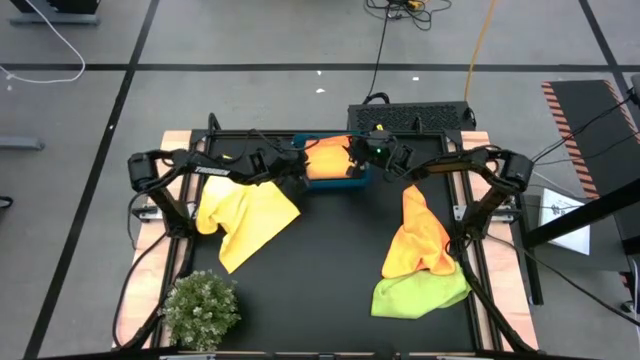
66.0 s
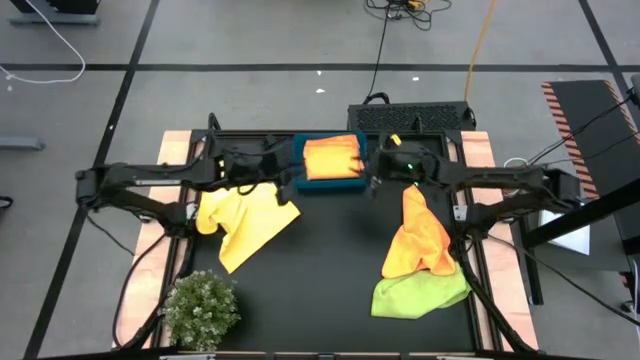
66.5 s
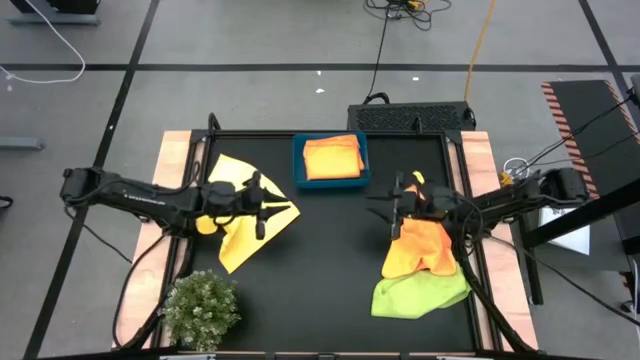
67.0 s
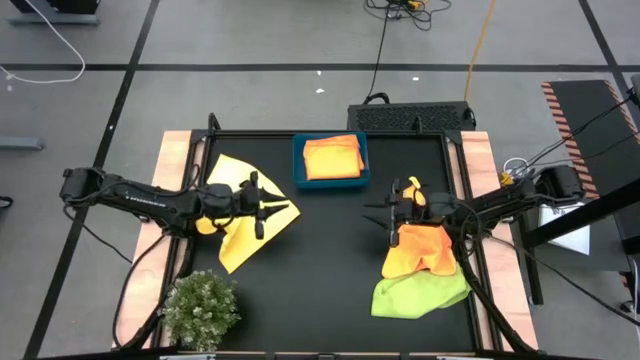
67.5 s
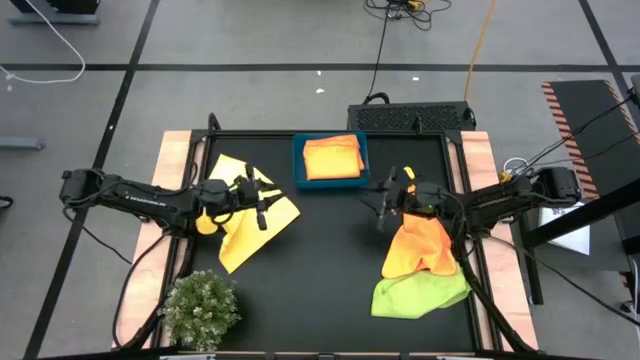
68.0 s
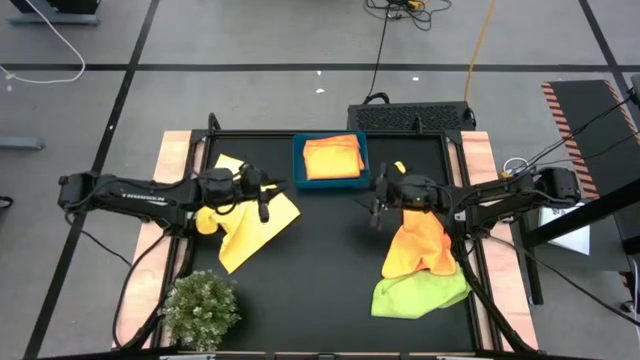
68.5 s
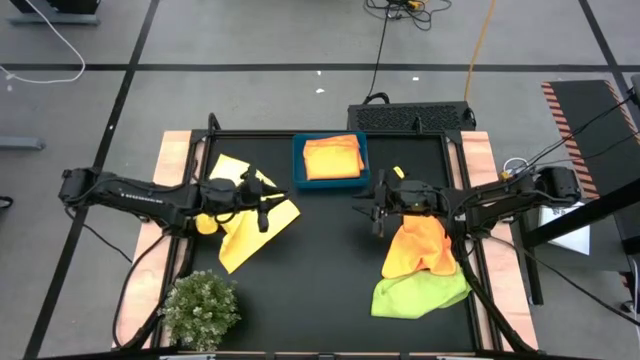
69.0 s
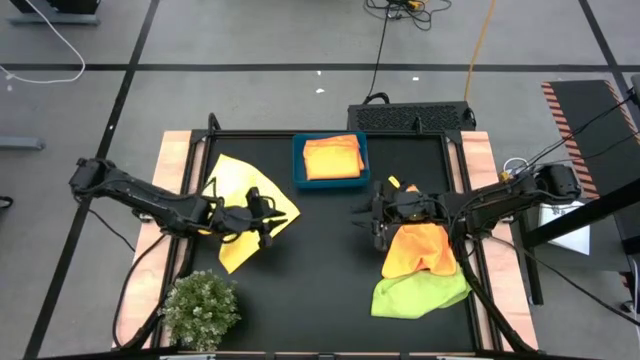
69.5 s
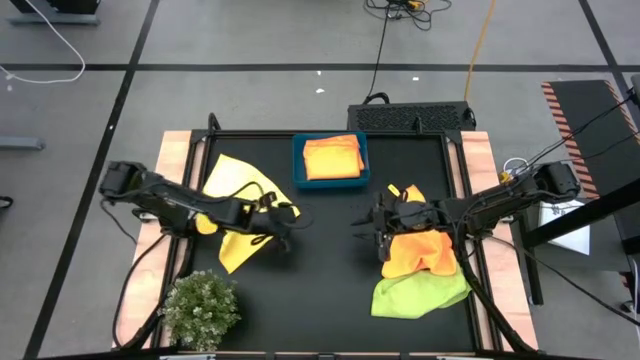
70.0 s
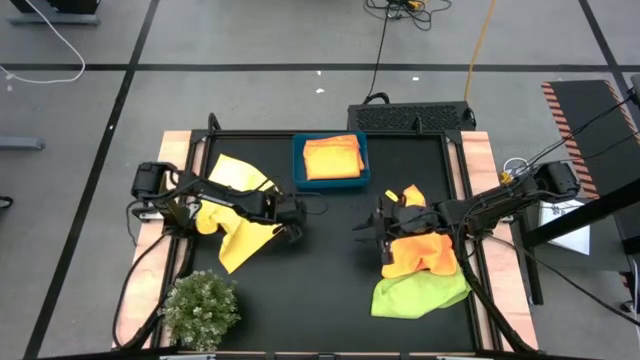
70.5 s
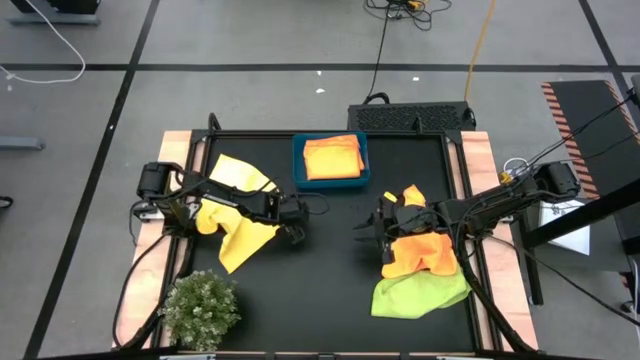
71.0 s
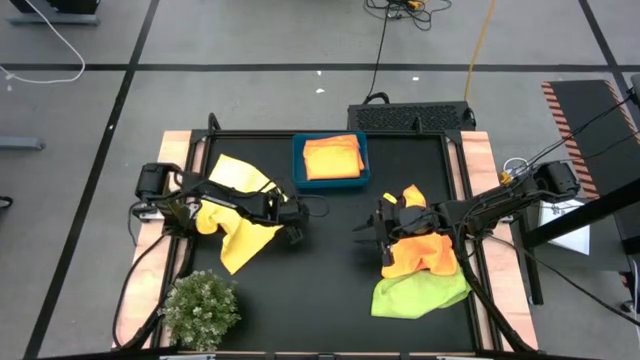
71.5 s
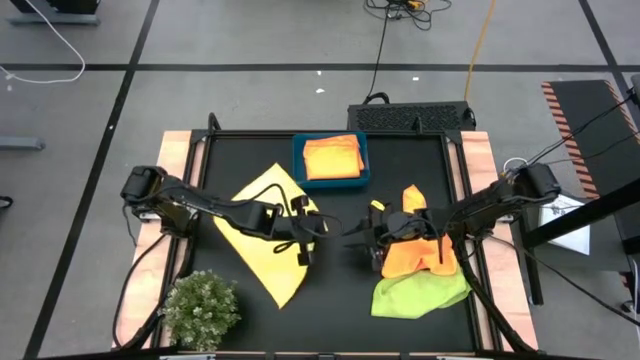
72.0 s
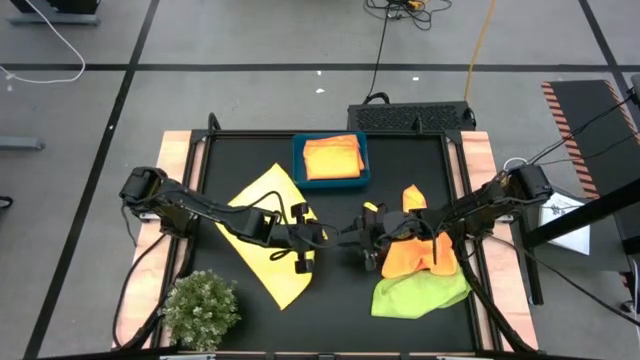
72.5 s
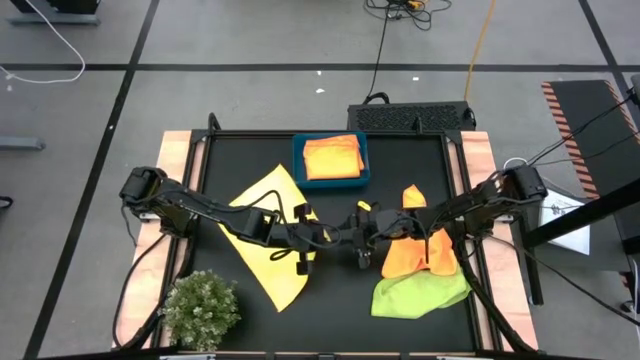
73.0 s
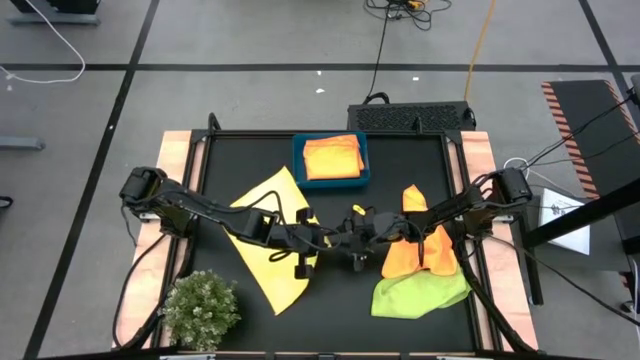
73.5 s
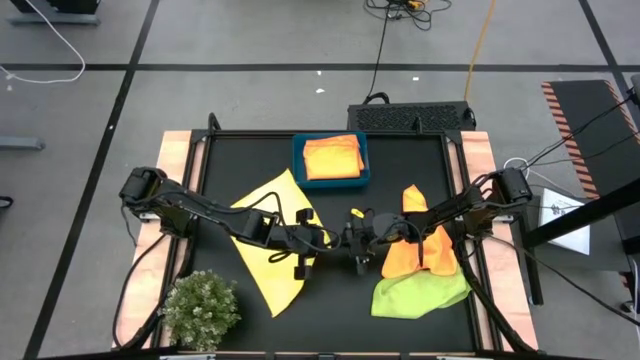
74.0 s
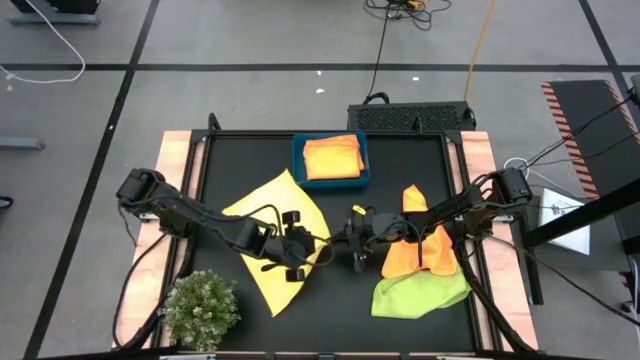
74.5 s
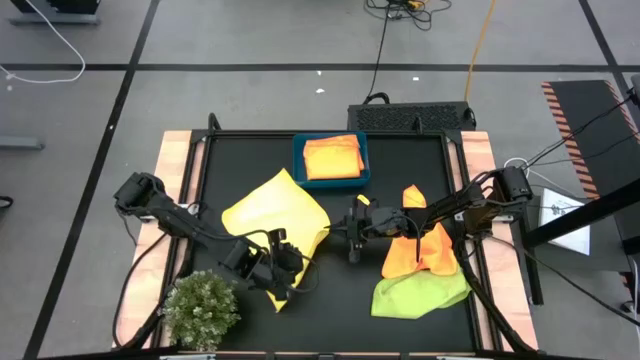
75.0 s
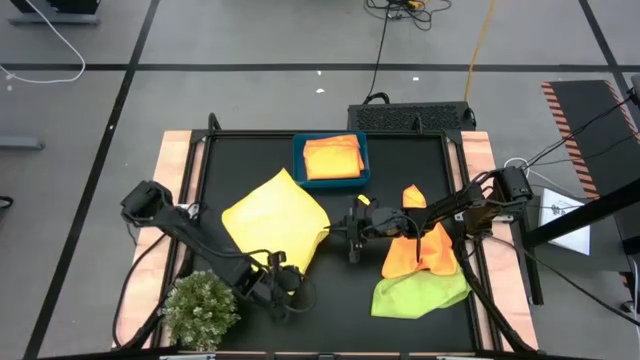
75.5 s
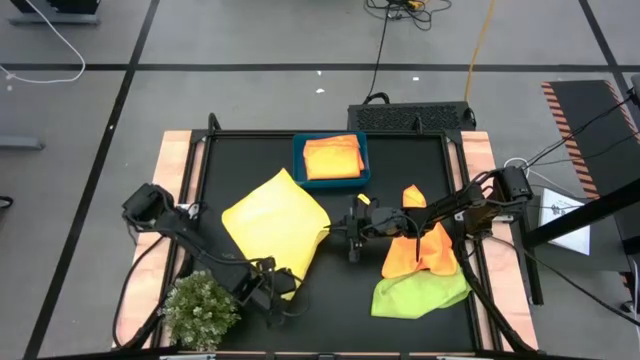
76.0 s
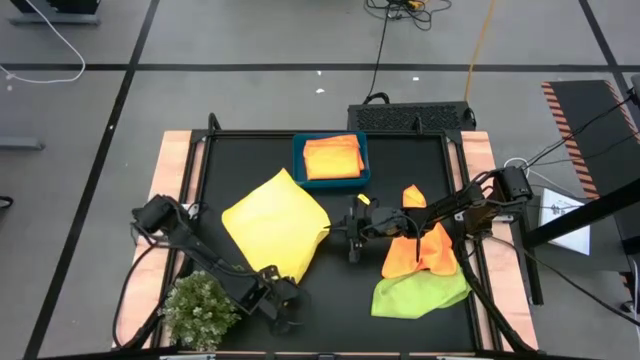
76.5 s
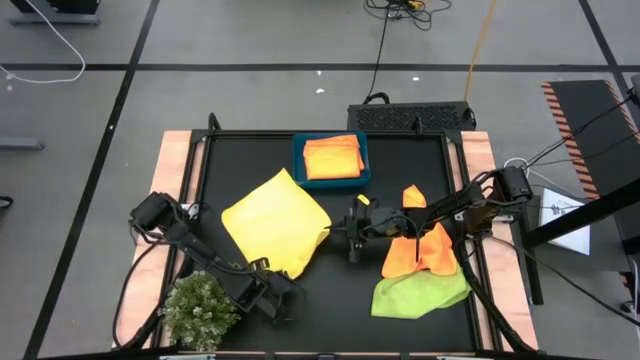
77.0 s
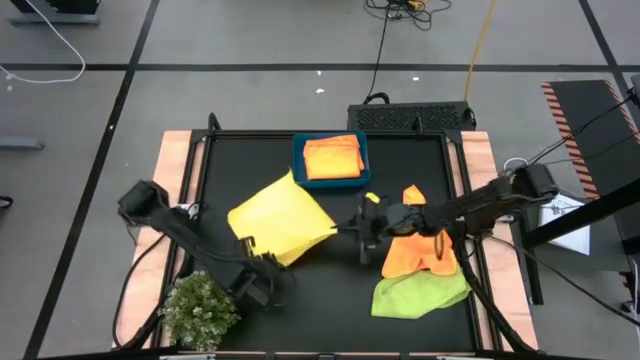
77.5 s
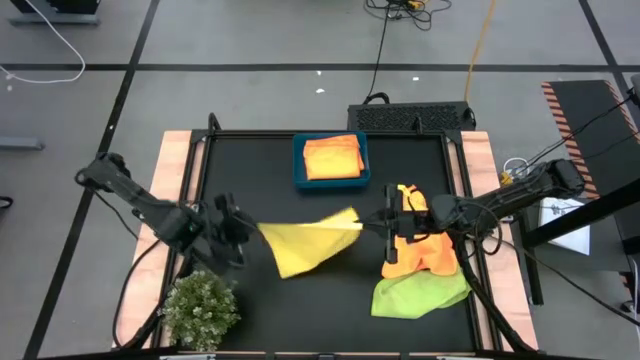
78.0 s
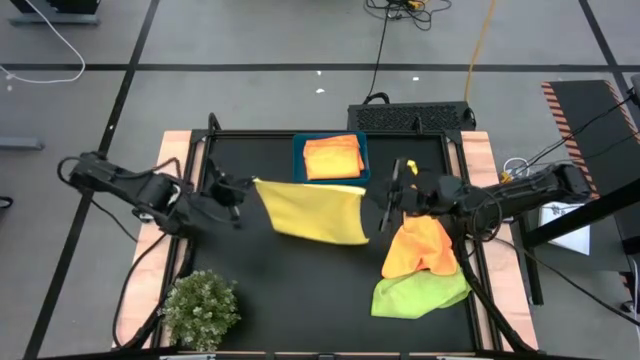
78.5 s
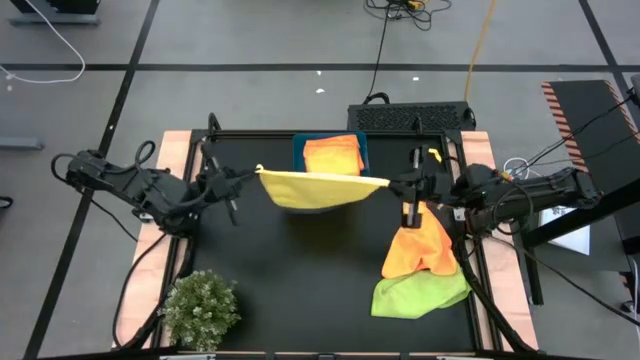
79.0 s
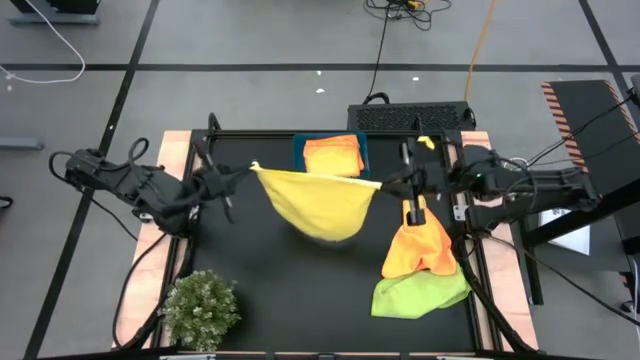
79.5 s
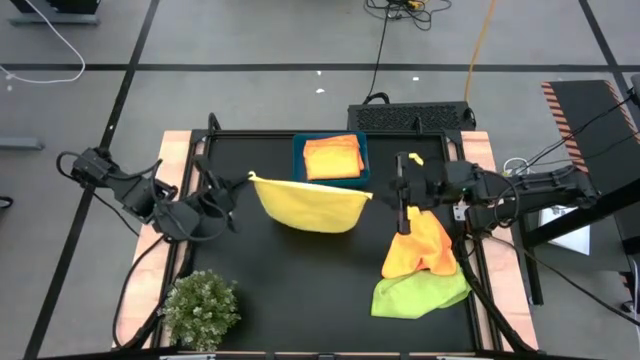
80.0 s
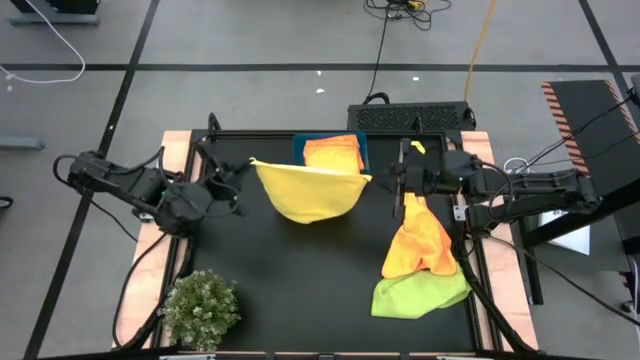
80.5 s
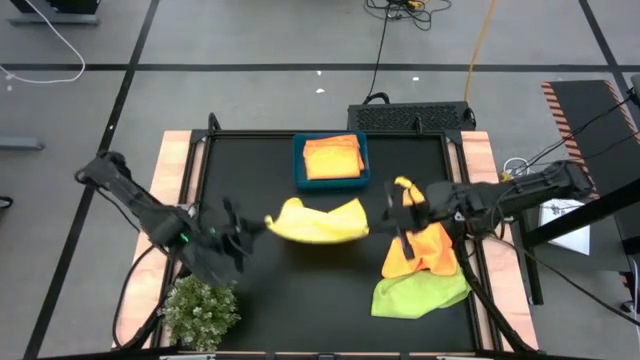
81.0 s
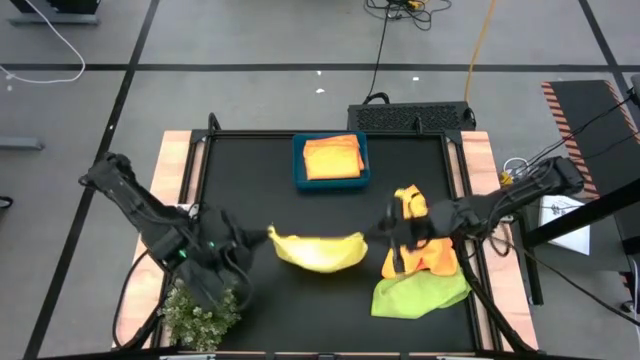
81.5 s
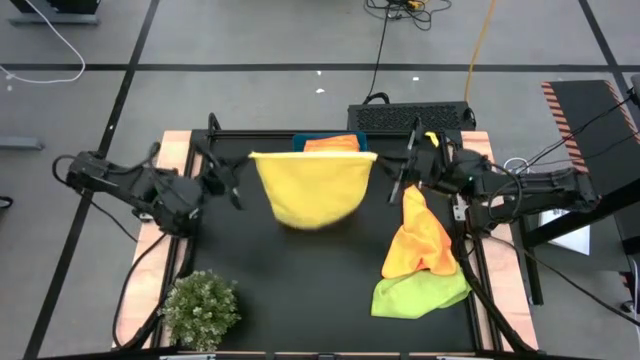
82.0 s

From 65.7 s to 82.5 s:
Task: Fold microfiber towels
Fold the yellow microfiber towel

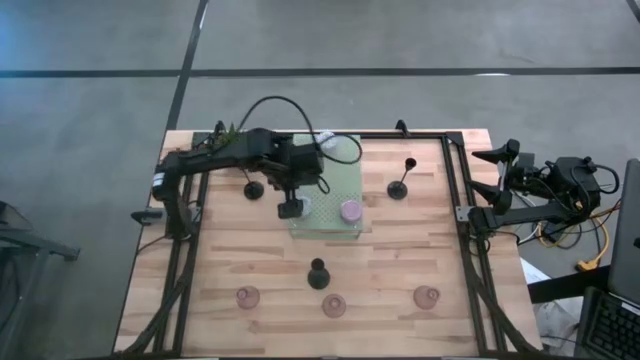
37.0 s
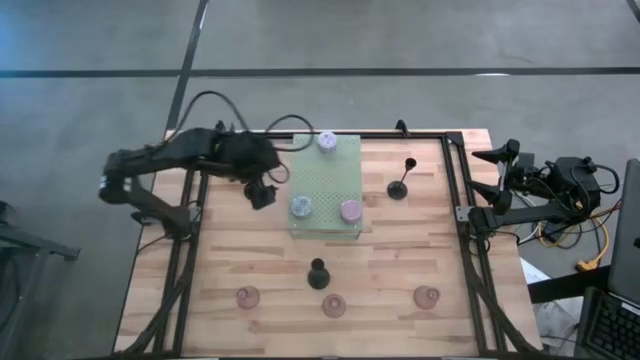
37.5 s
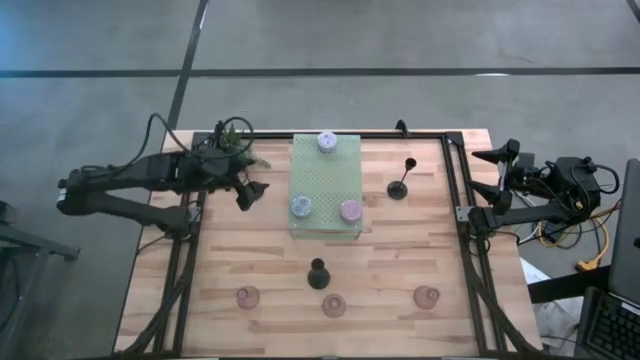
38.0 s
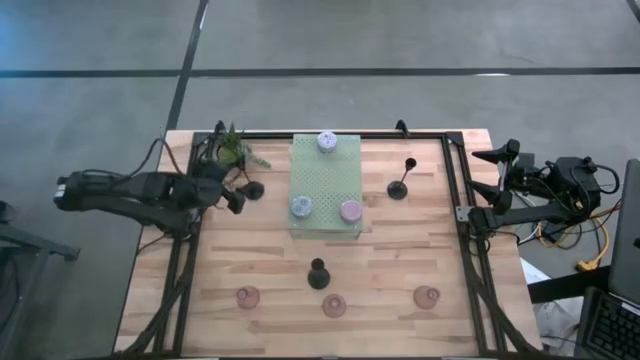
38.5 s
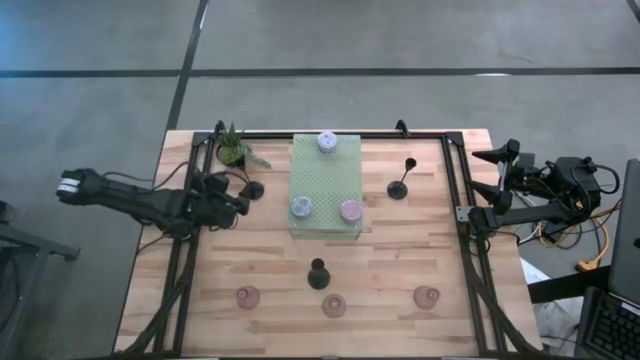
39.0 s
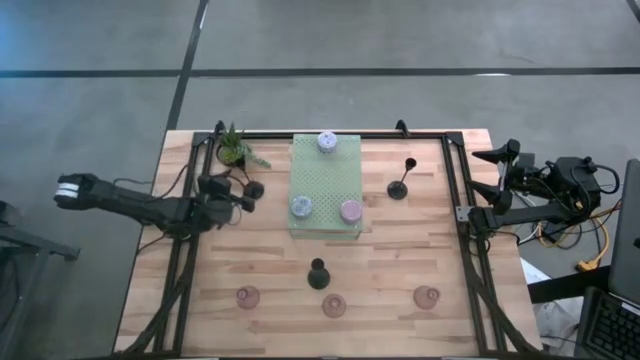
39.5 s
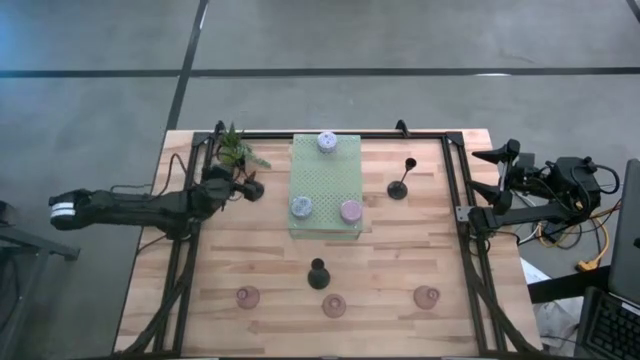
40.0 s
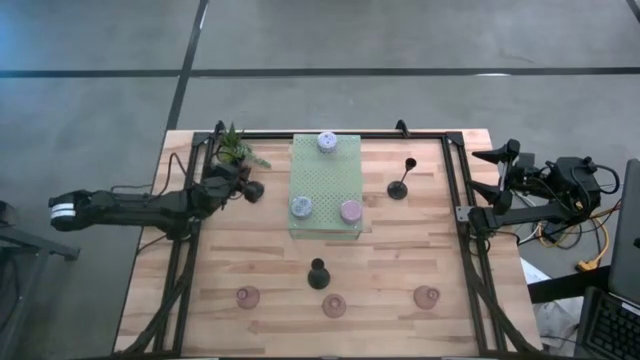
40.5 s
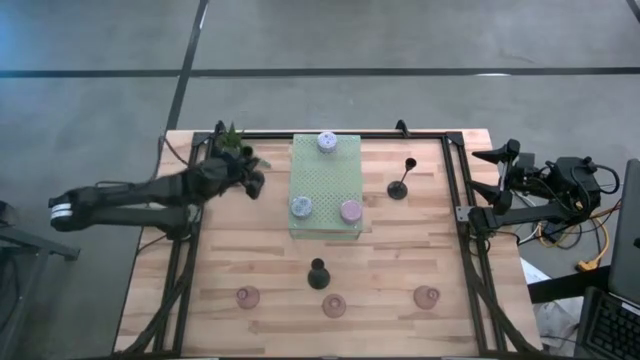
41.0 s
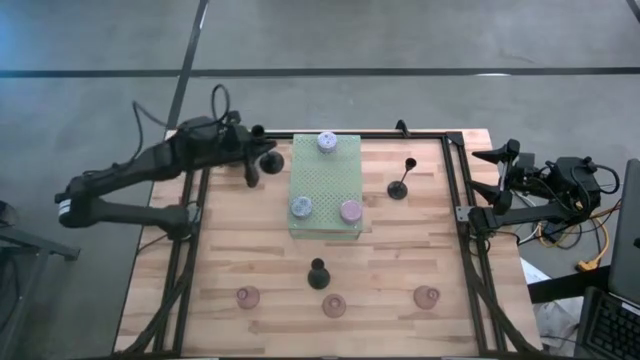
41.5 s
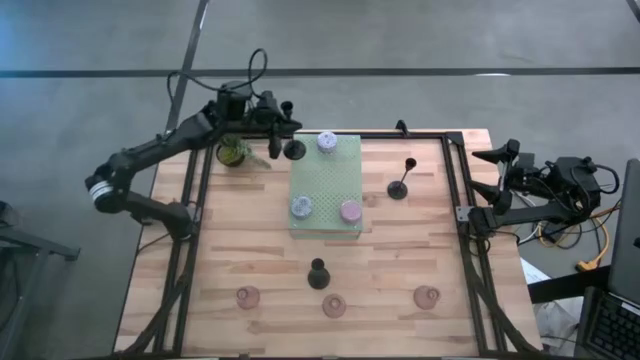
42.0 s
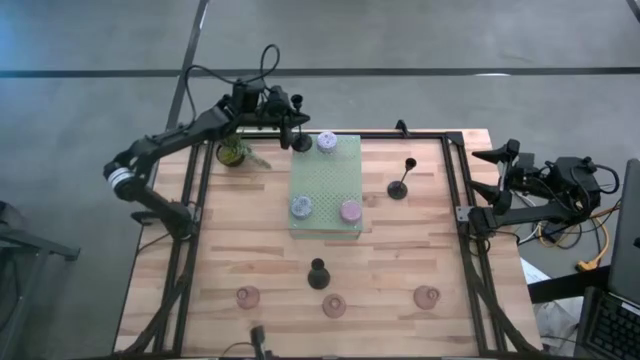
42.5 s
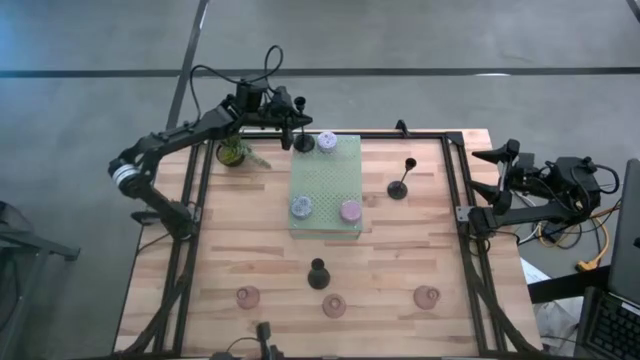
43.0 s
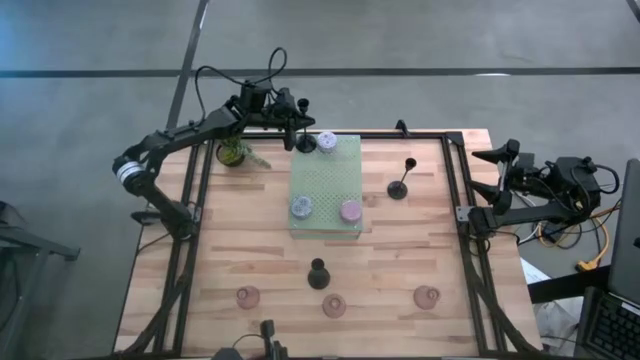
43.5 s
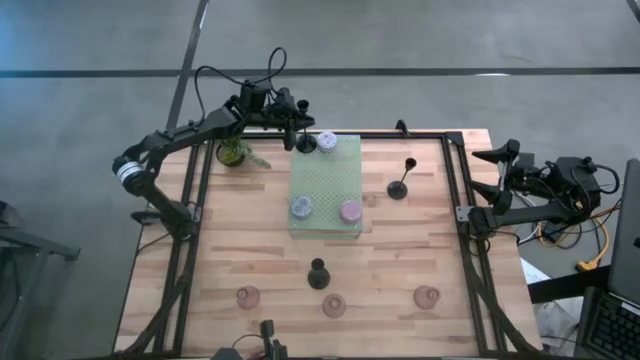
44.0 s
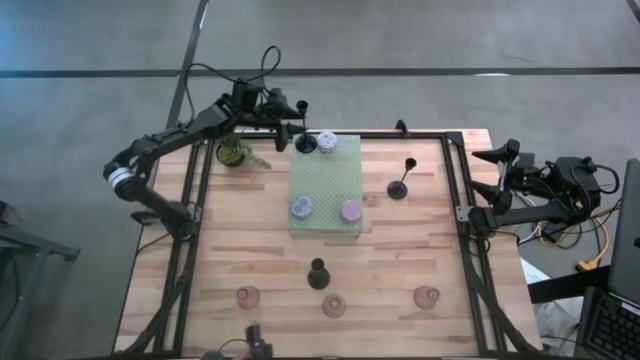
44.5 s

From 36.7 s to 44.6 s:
Task: Pick & Place candle stick holders
Put the top left black candle holder on the shelf
